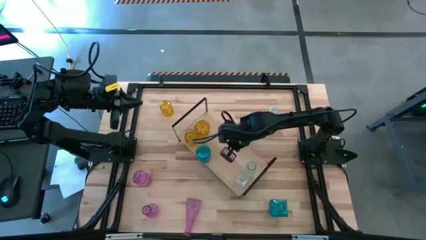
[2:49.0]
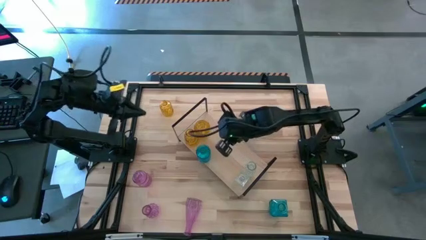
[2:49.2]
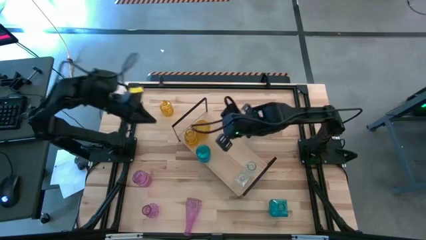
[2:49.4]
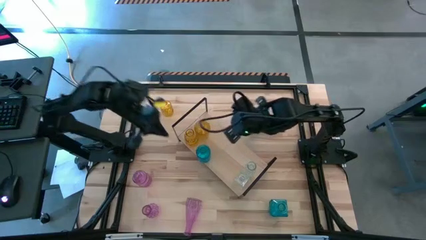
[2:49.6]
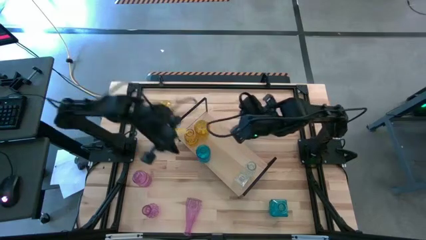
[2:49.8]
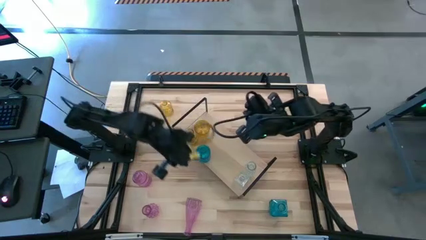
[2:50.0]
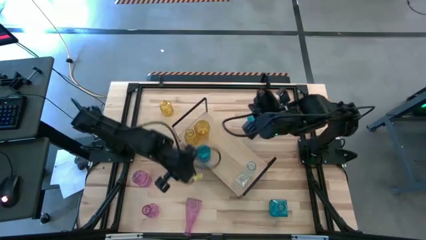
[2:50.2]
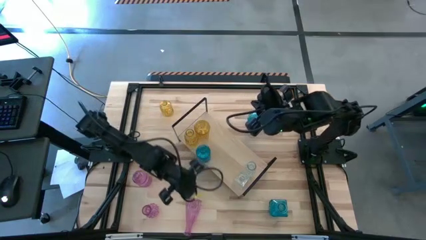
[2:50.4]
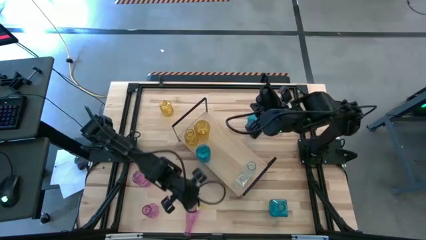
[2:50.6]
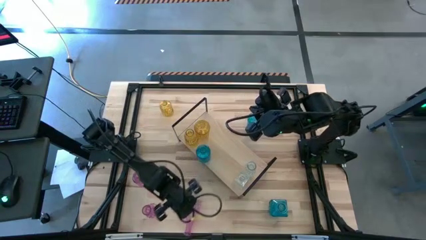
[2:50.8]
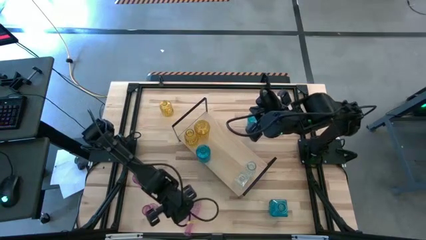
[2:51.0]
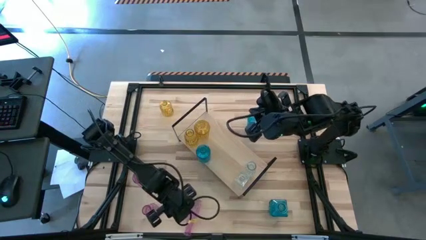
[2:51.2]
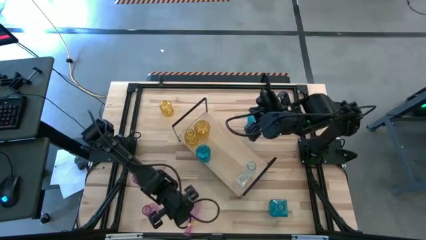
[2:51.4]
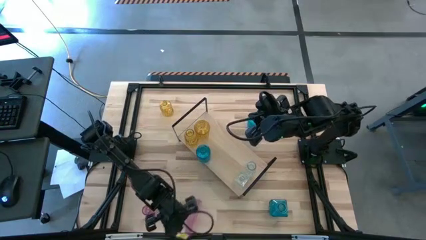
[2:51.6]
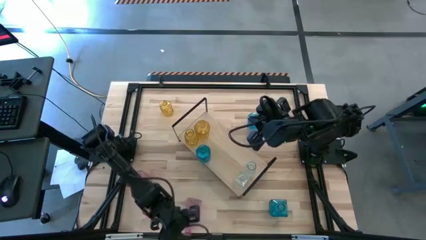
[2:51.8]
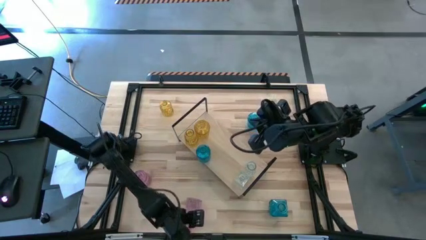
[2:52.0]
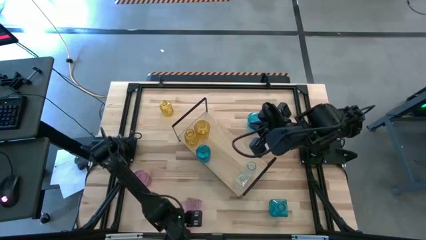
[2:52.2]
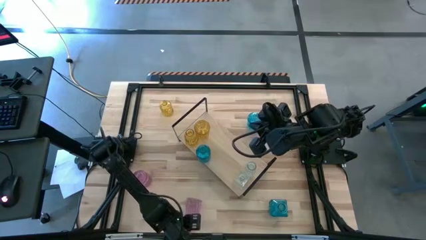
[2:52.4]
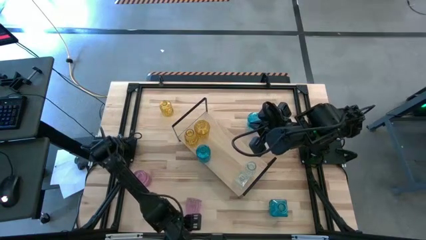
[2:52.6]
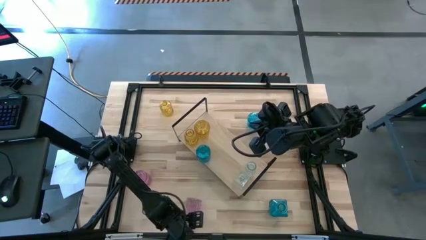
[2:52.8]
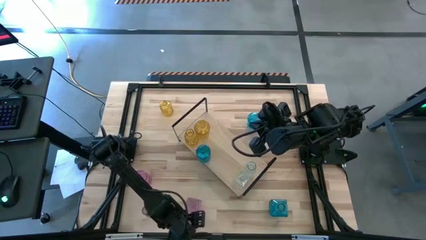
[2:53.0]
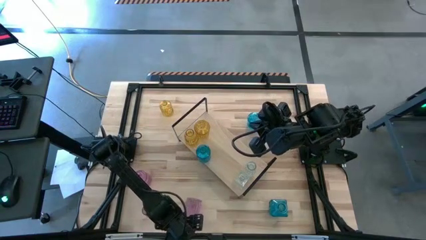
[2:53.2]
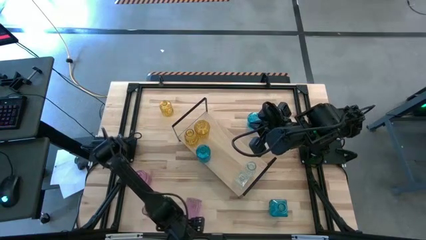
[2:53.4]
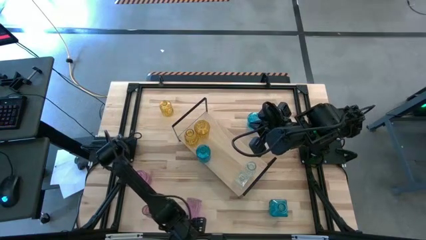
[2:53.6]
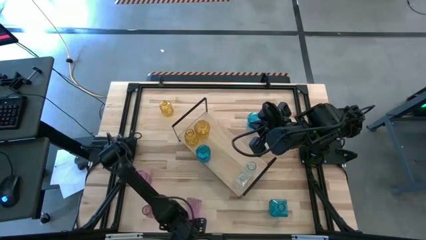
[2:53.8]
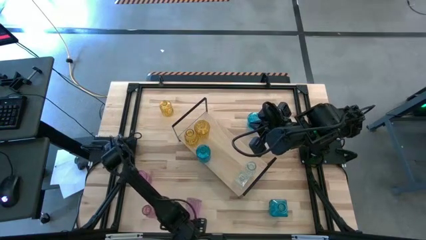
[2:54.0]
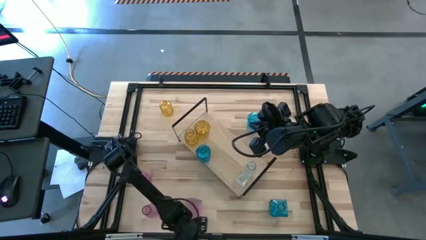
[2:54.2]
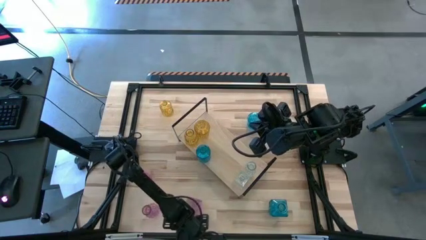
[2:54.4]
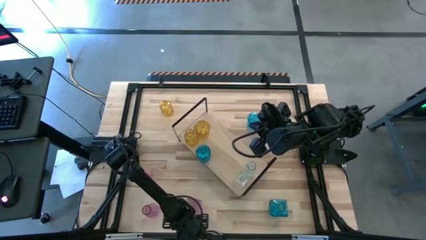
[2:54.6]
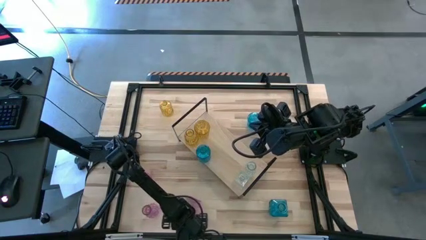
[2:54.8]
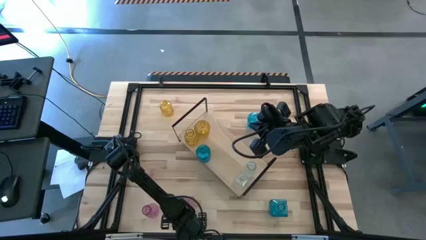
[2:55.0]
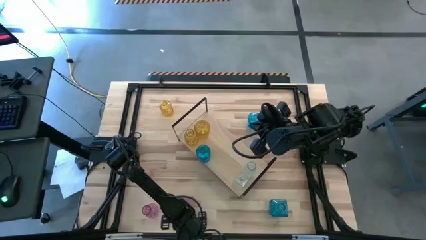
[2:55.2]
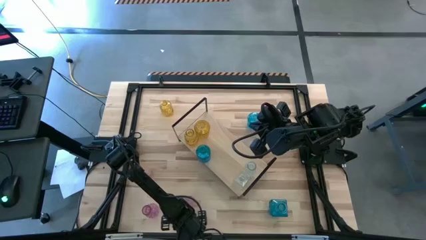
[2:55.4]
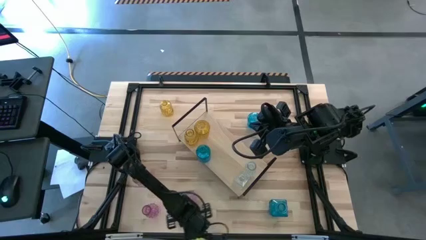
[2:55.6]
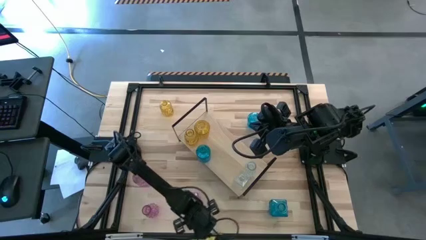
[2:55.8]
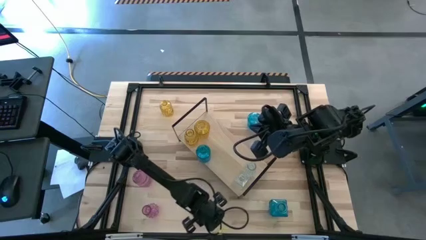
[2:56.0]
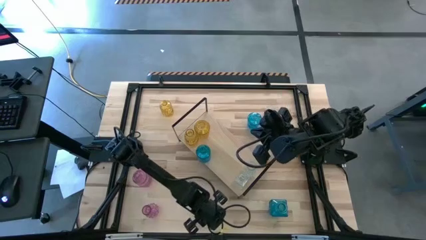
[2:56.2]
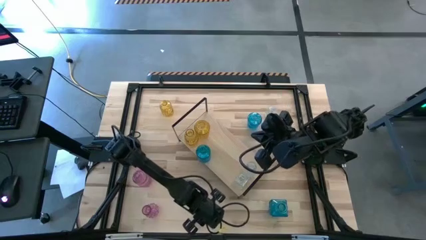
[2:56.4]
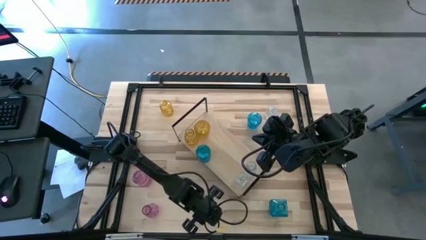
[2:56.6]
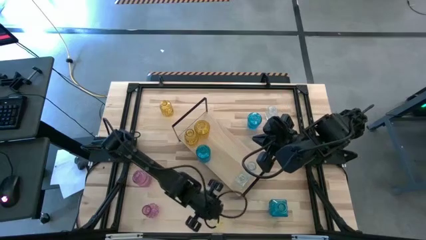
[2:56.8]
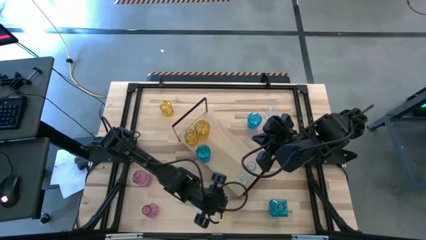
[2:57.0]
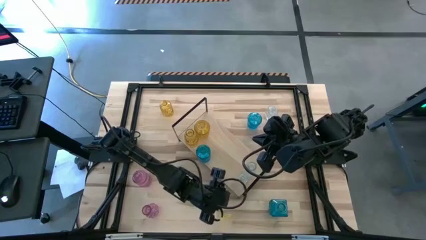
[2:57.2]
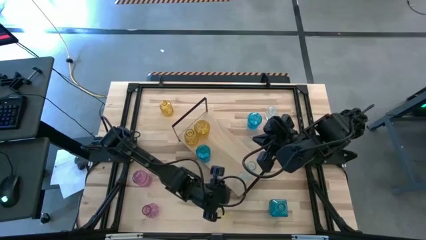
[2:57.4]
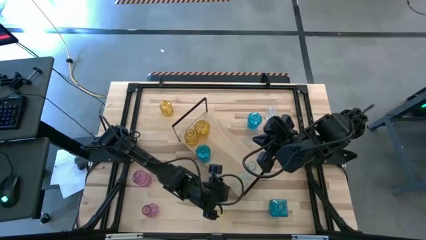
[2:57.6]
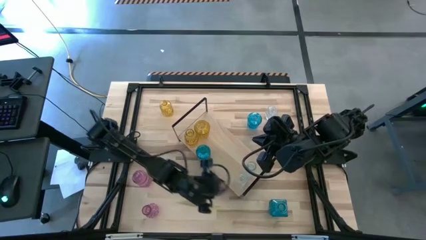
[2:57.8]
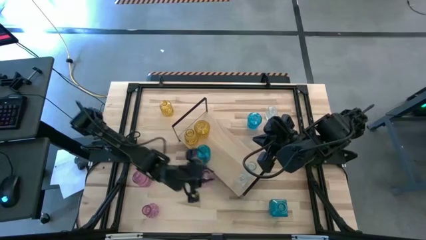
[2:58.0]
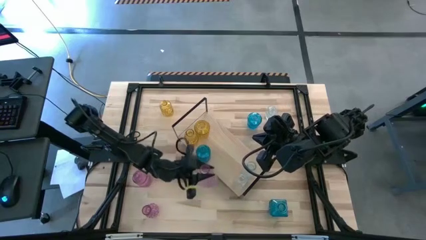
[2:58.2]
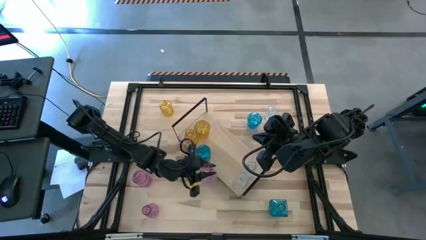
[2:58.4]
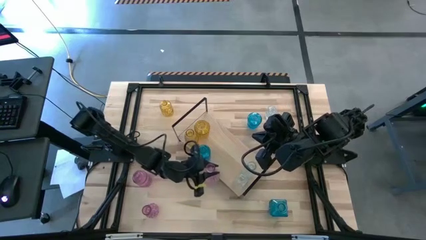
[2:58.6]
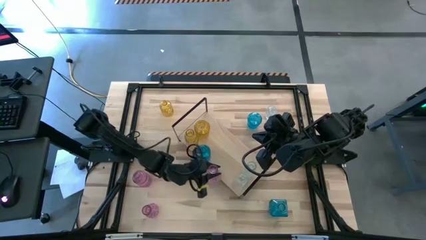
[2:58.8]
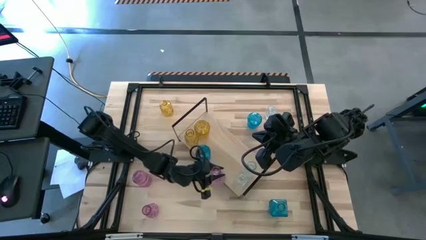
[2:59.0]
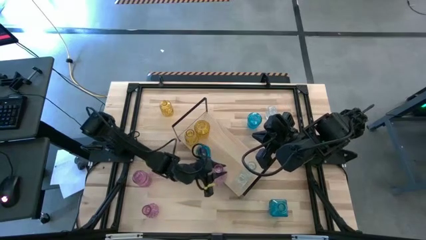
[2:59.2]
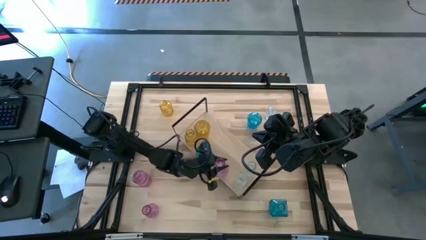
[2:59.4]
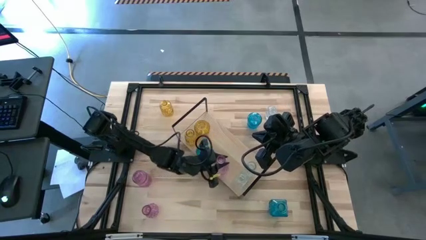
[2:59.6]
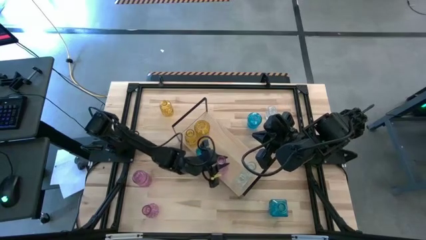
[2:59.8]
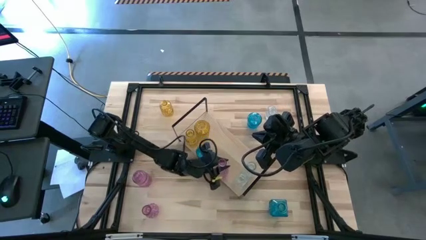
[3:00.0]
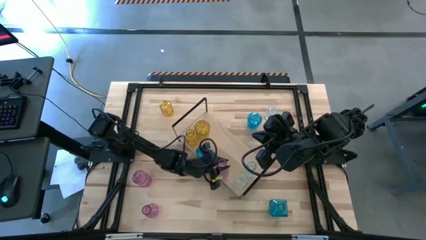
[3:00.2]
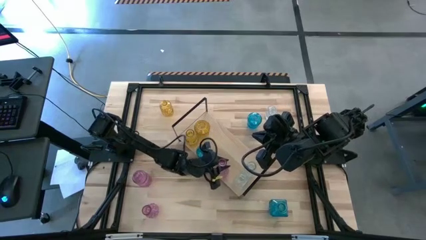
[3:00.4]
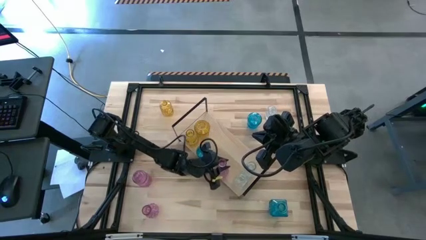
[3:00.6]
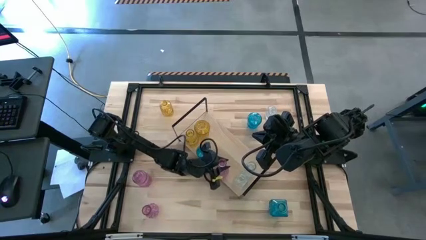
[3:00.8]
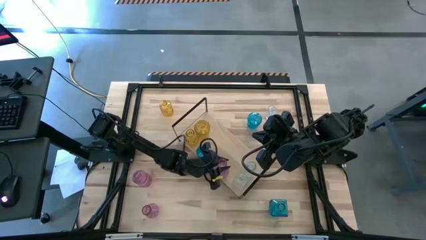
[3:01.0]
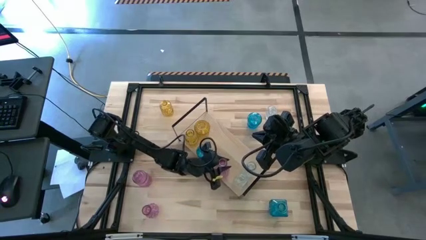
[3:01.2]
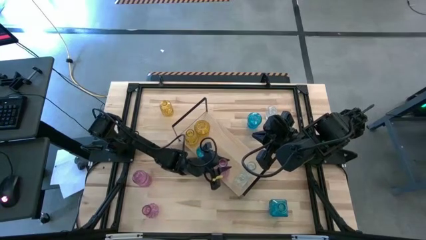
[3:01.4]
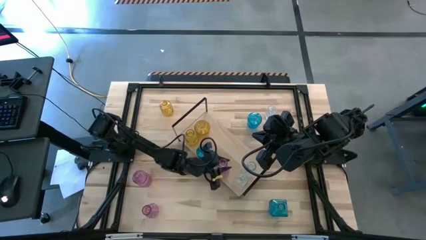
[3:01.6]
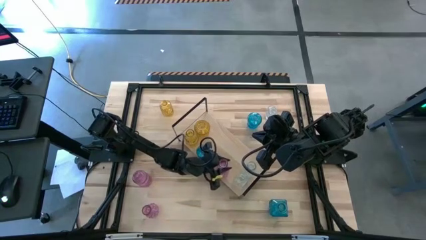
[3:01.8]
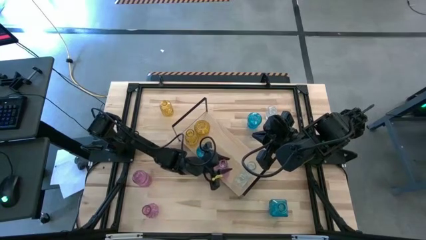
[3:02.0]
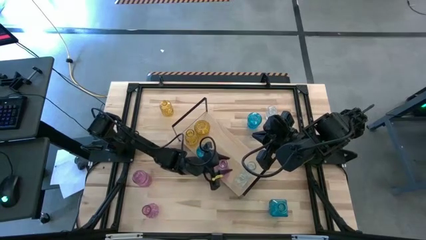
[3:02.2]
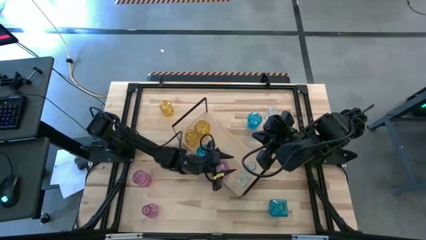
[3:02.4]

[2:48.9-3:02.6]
Task: sort vases onto shelf
Put the bottom right pink crystal vase on the shelf
